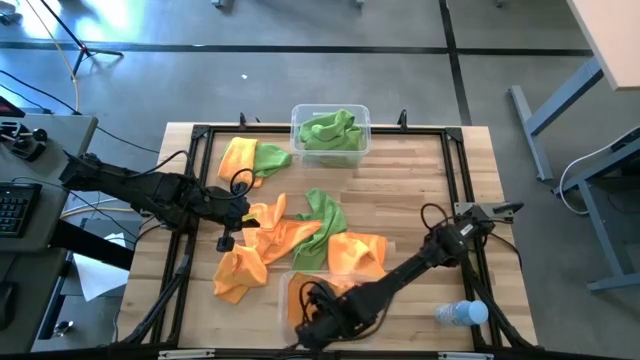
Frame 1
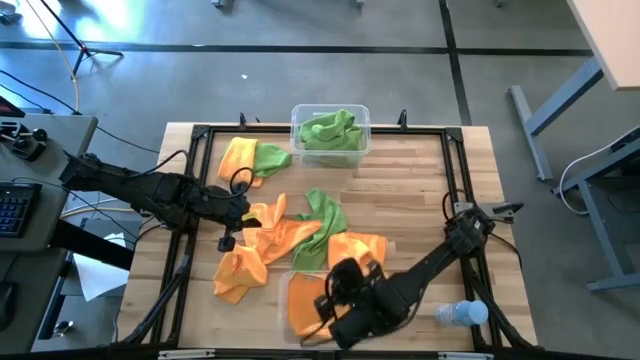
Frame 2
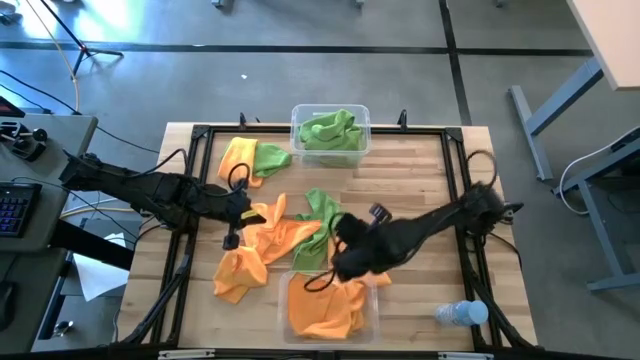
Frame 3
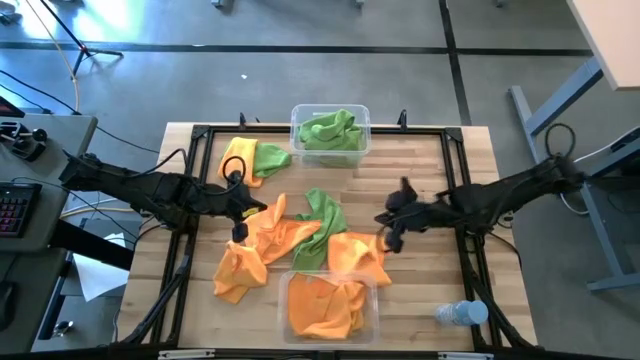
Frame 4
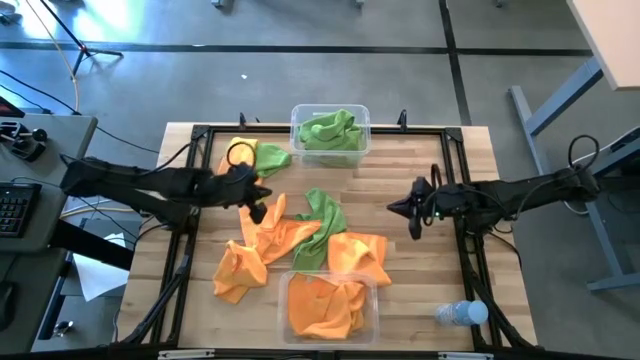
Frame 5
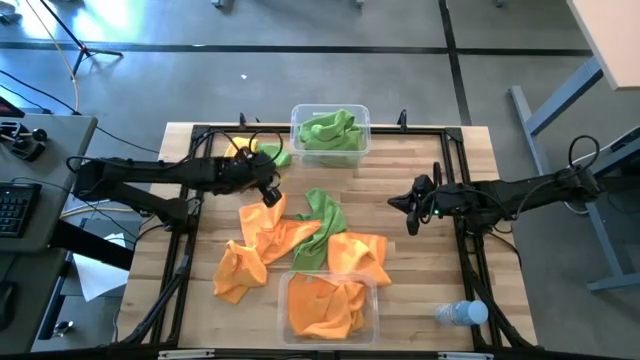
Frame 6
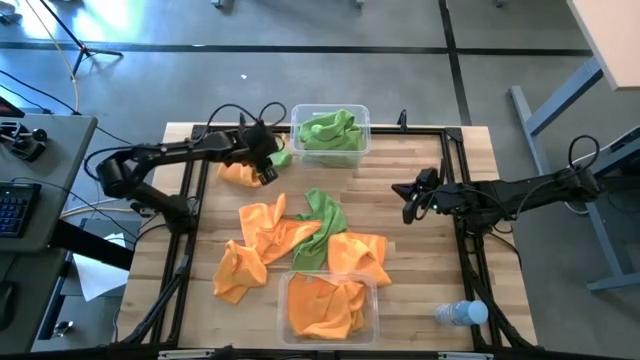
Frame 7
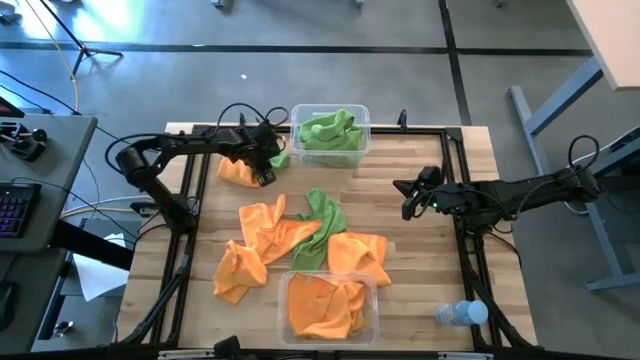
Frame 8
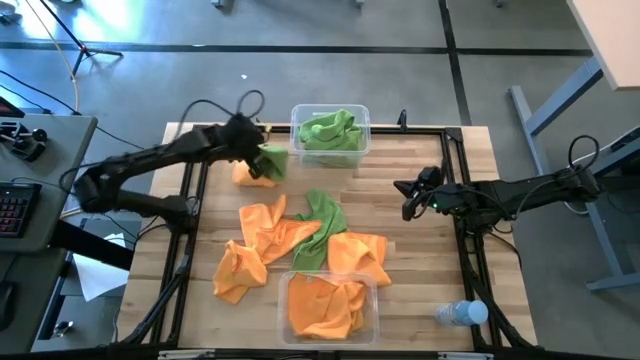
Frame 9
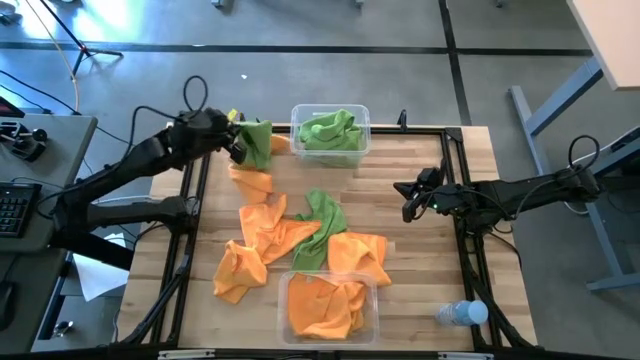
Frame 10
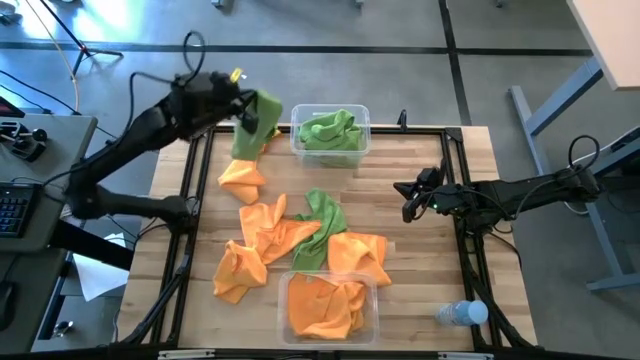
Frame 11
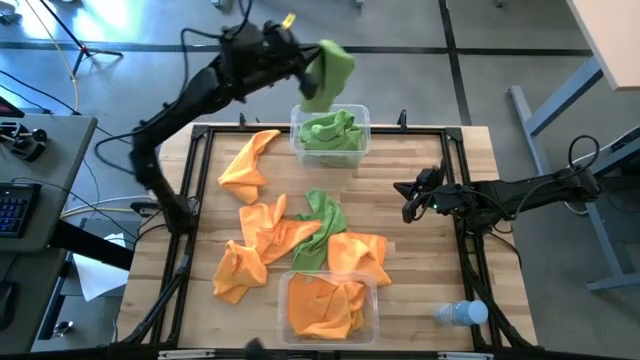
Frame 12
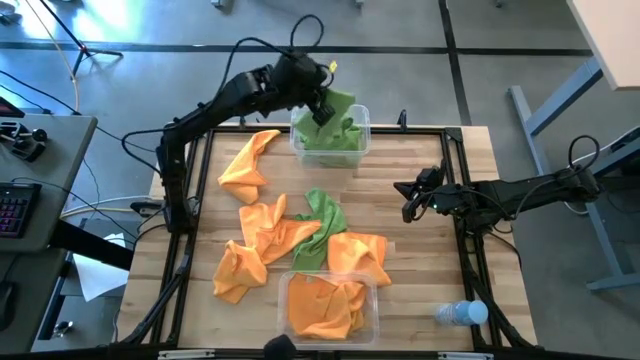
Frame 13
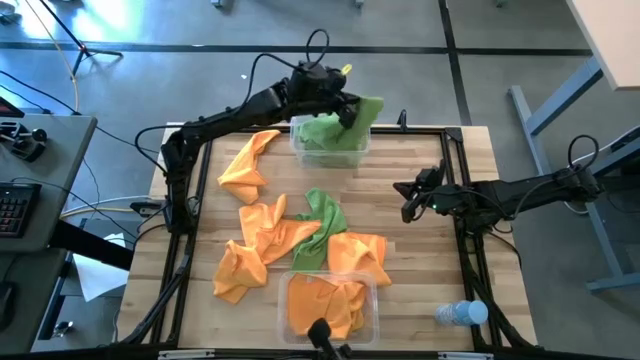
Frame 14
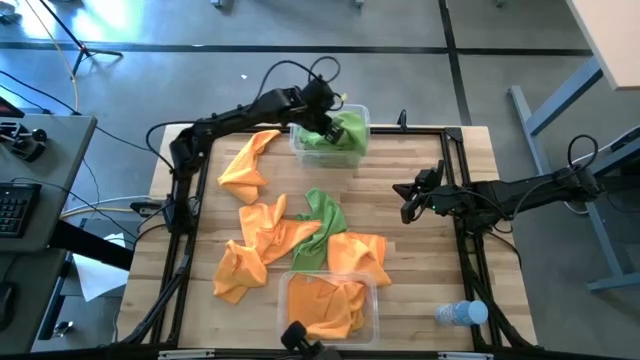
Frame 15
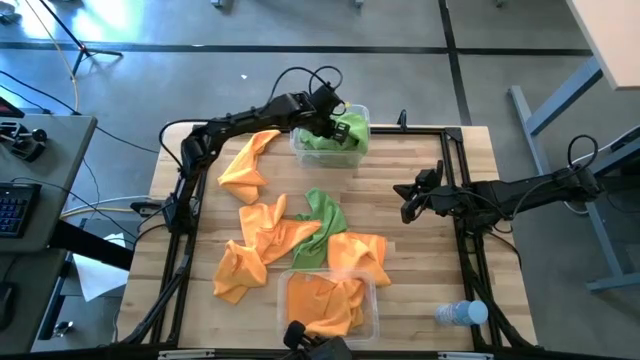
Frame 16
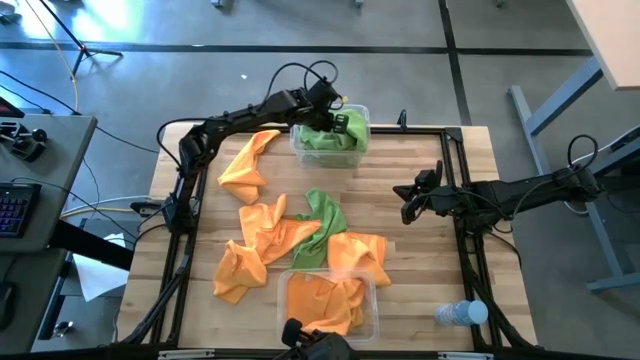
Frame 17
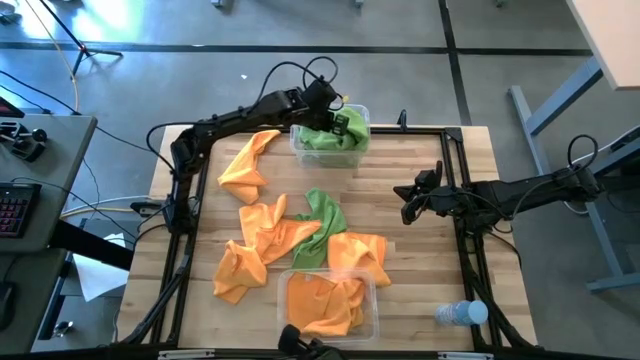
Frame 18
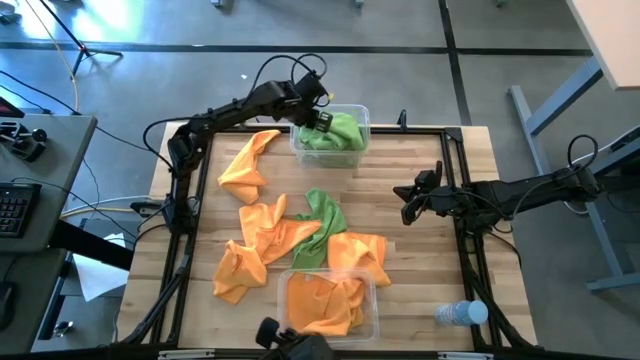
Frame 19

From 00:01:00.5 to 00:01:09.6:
Task: Sort microfiber towel by color & place in baskets
Put the green towel into the top transparent bin

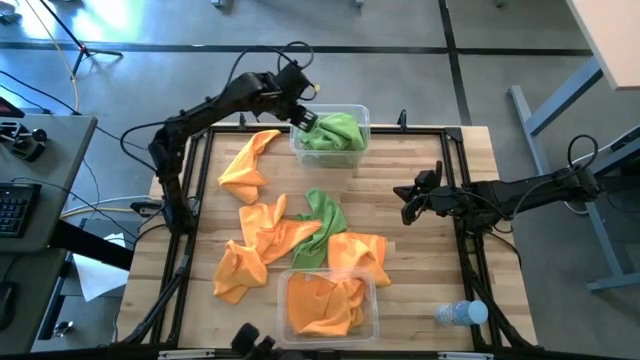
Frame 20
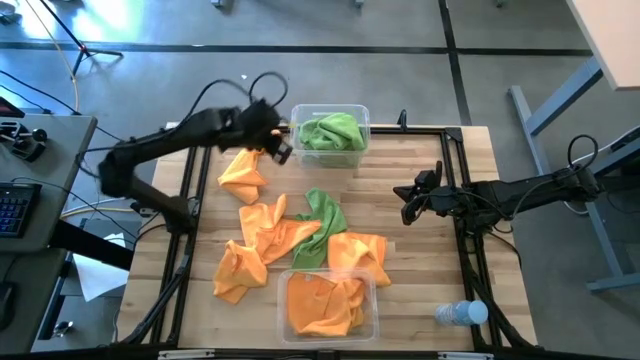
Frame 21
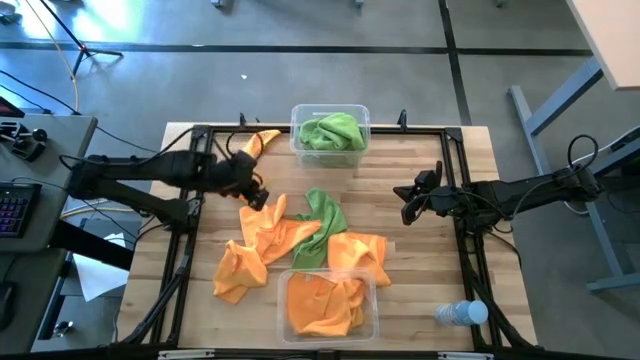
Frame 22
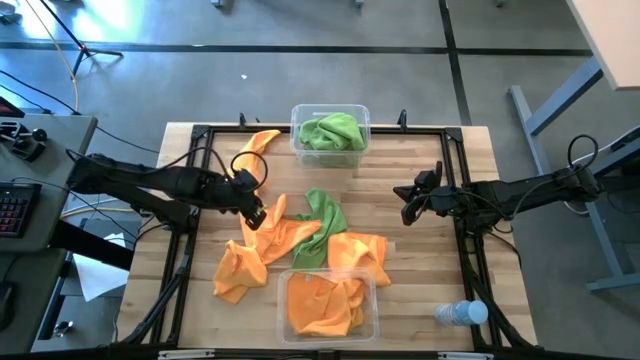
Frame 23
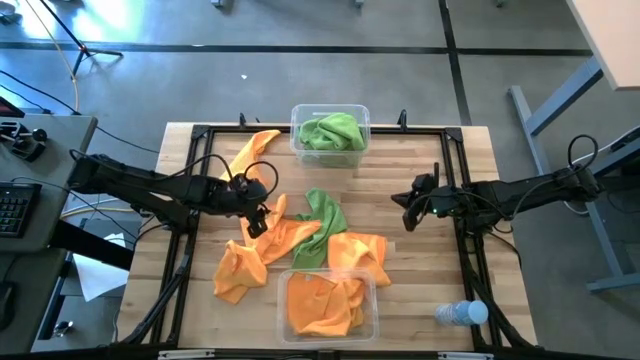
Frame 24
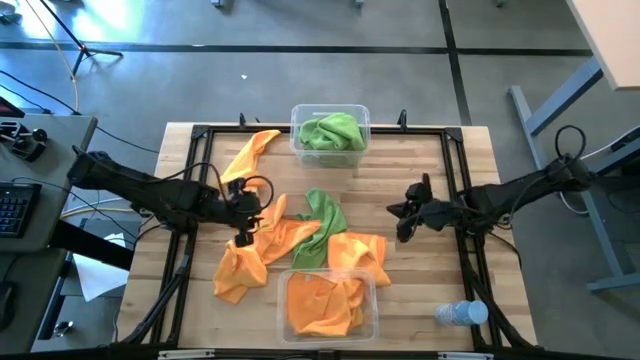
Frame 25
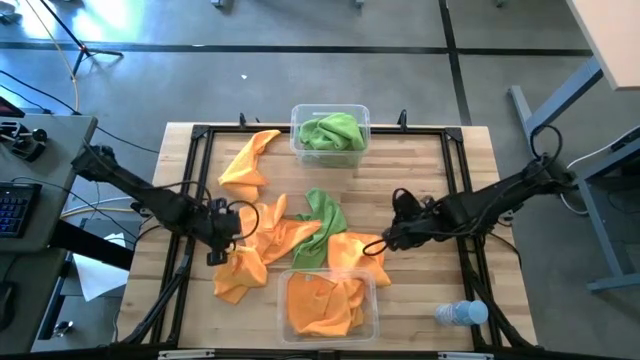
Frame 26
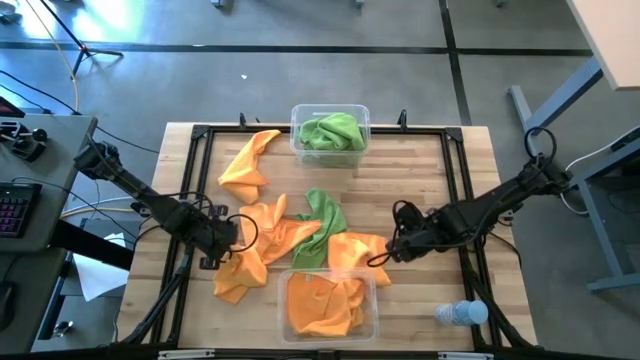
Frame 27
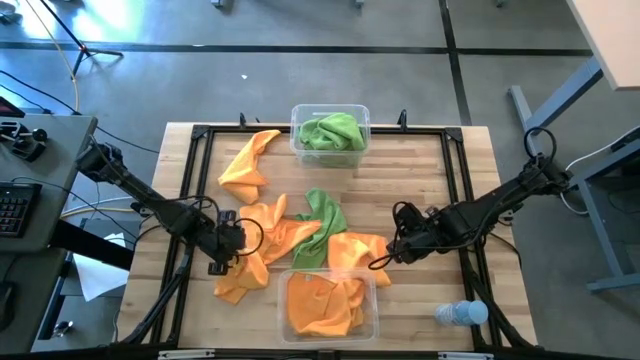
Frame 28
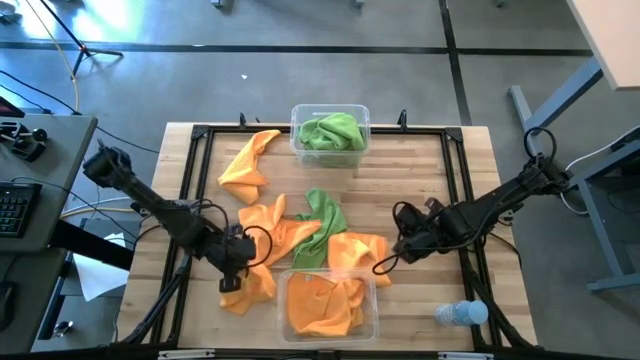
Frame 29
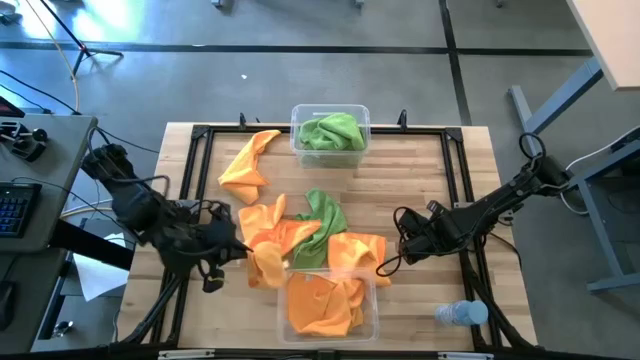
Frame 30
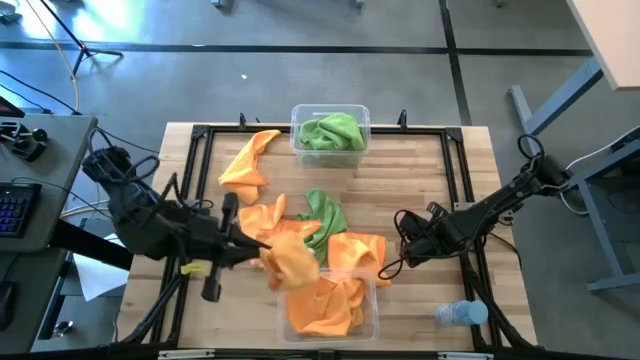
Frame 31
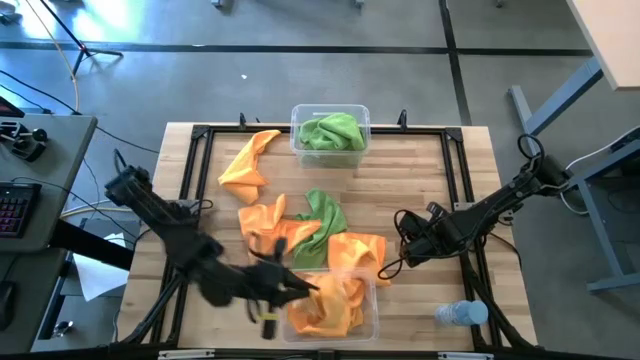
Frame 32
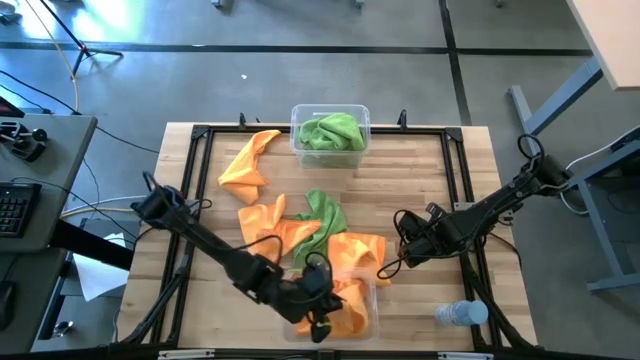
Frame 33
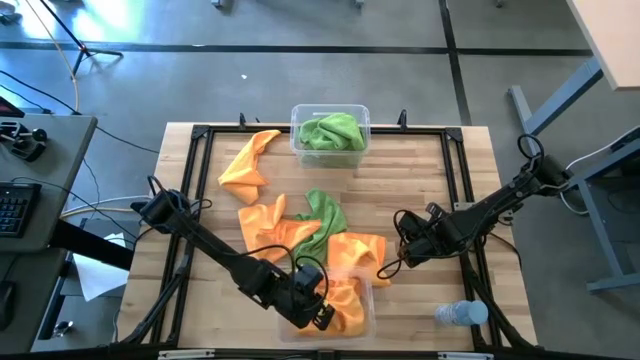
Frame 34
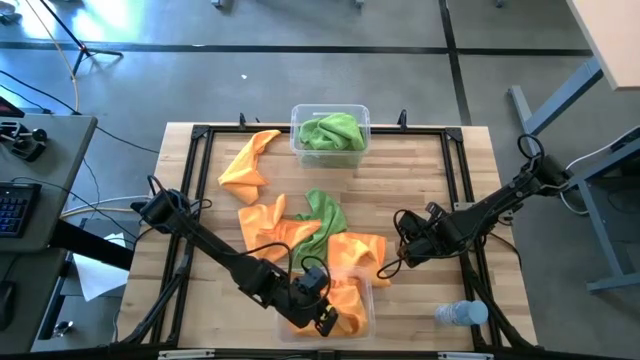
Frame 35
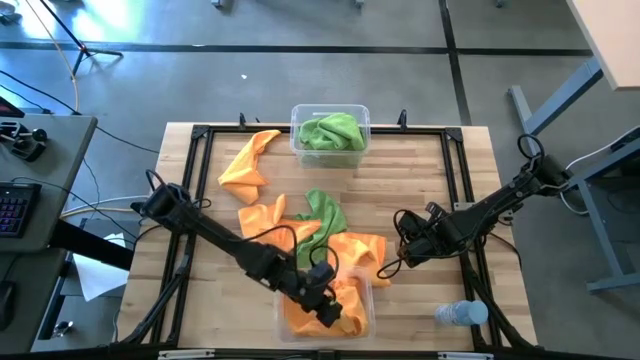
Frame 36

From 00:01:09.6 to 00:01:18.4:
Put the yellow towel into the bottom transparent bin

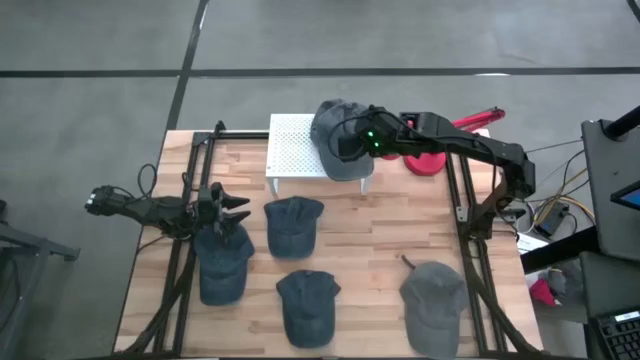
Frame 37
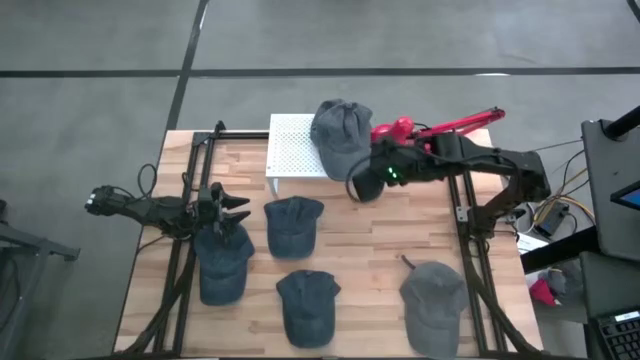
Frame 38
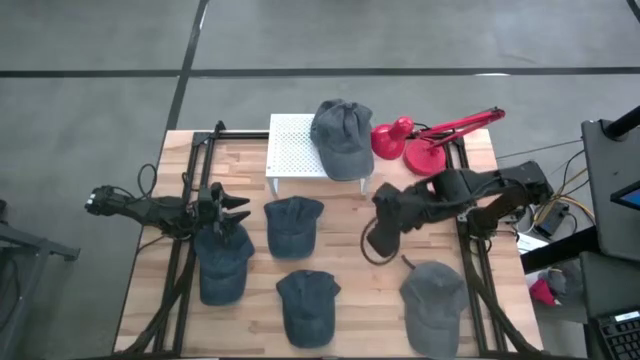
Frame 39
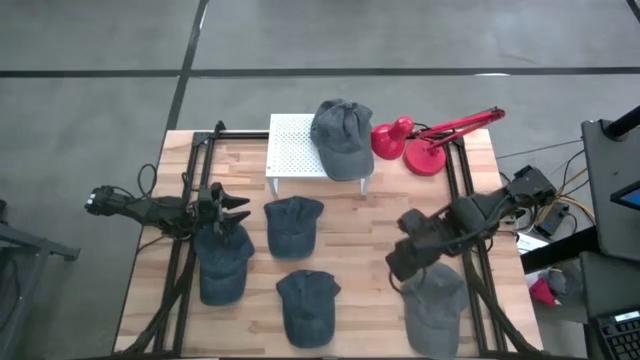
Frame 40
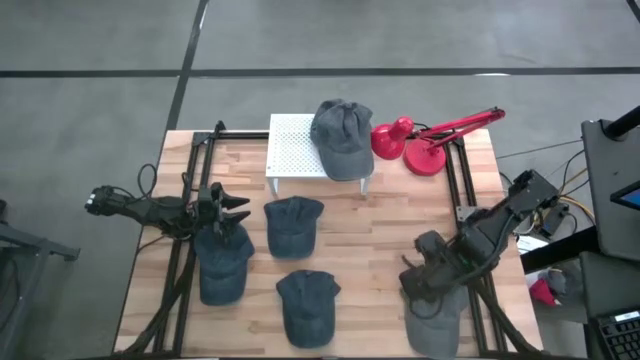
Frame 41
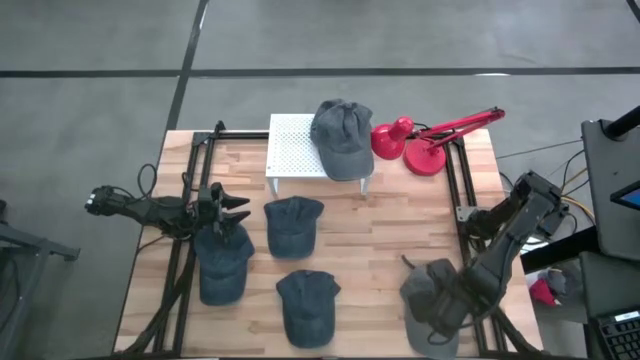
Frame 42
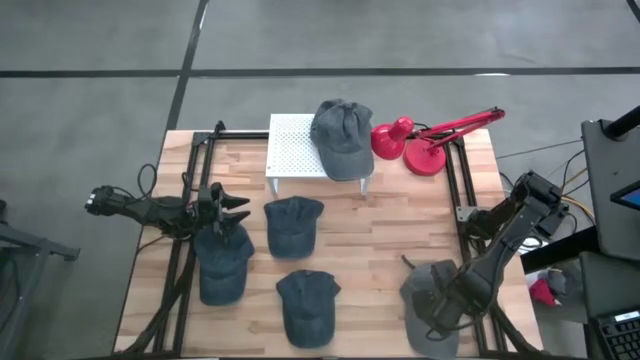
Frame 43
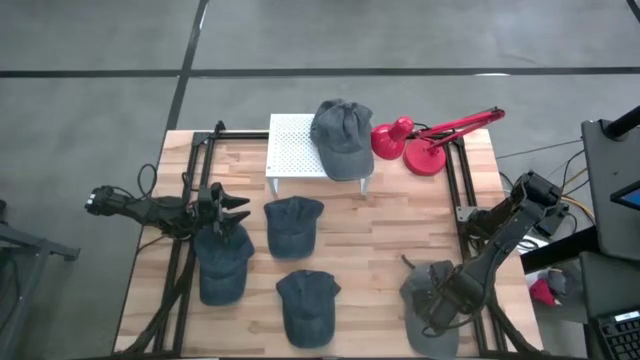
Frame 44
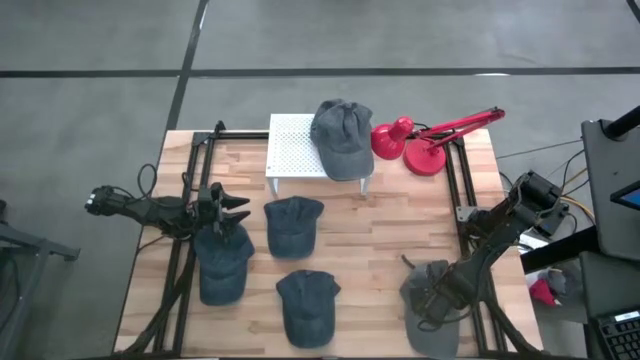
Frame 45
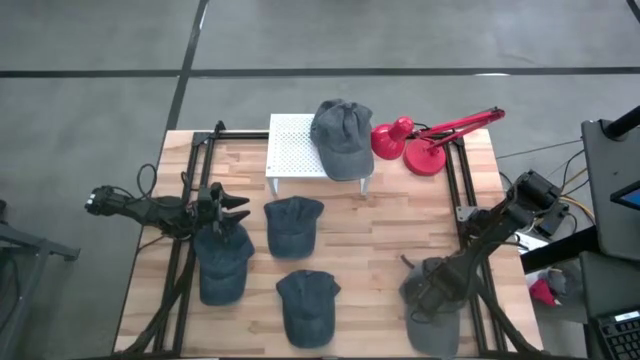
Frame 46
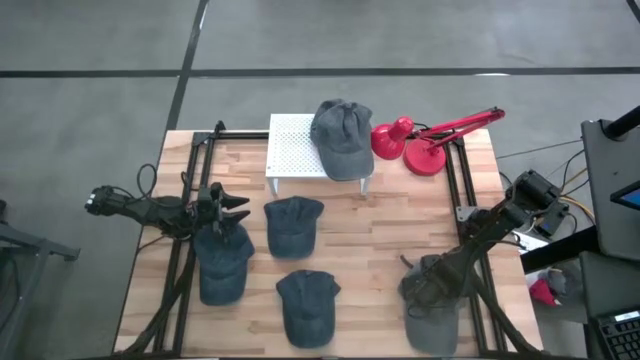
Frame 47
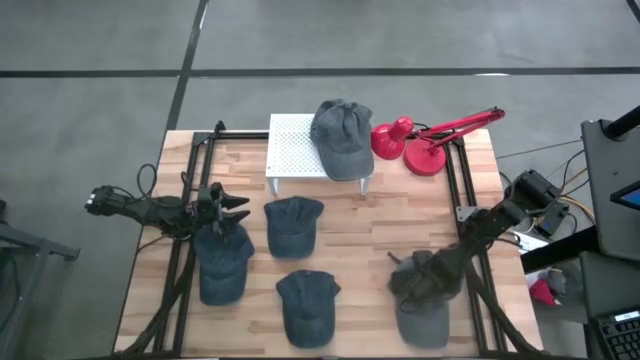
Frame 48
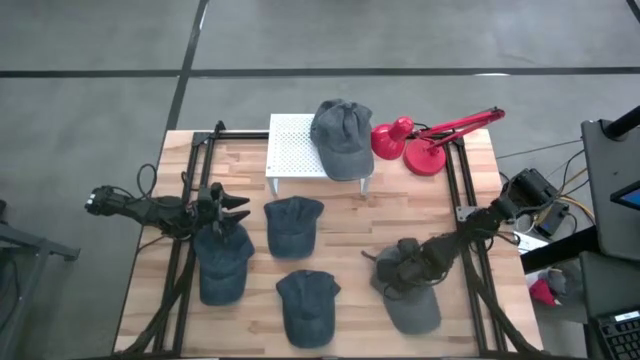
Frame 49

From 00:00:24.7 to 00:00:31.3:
Task: Pick & Place hat
Stack the gray cap on the gray caps on the shelf
